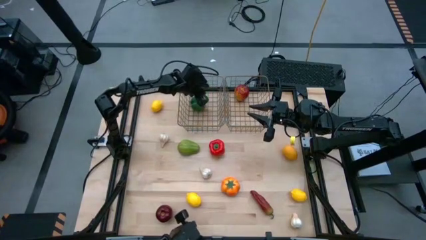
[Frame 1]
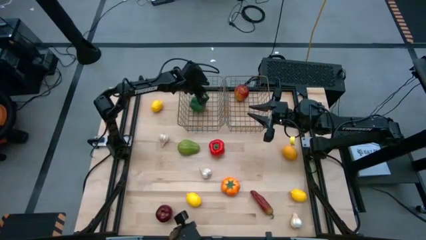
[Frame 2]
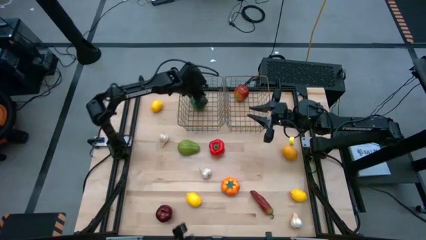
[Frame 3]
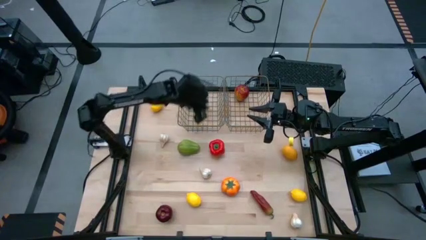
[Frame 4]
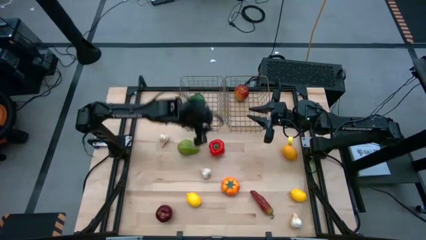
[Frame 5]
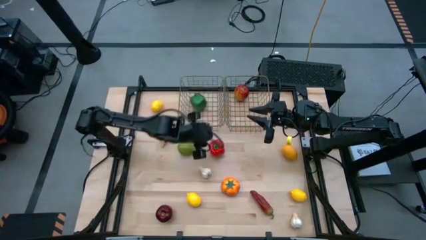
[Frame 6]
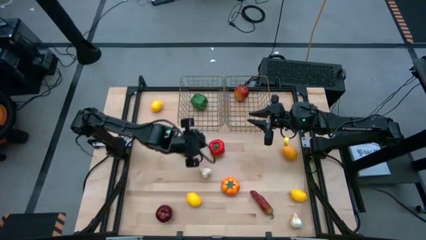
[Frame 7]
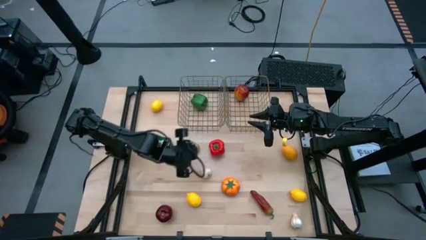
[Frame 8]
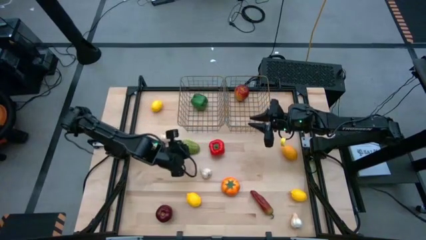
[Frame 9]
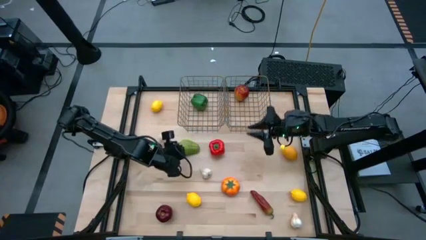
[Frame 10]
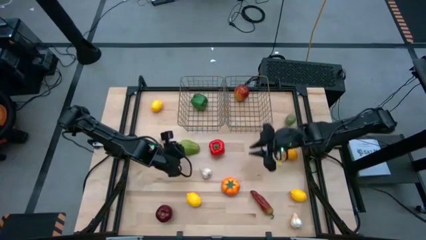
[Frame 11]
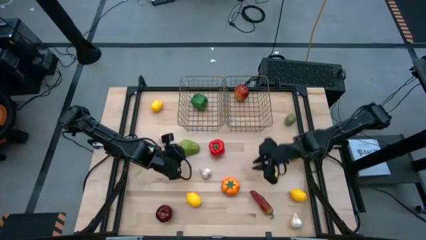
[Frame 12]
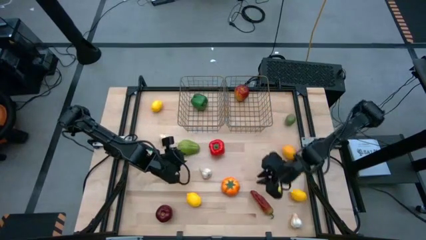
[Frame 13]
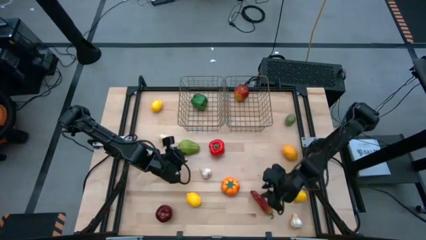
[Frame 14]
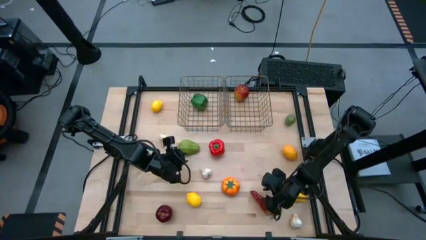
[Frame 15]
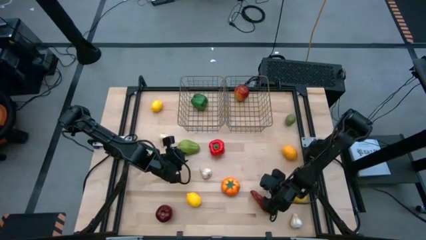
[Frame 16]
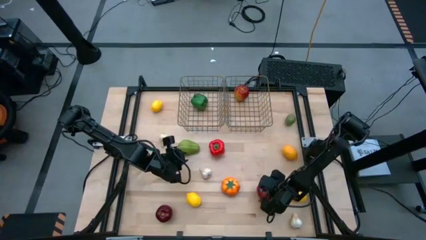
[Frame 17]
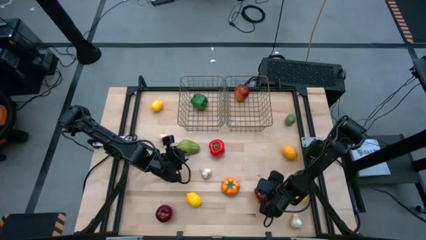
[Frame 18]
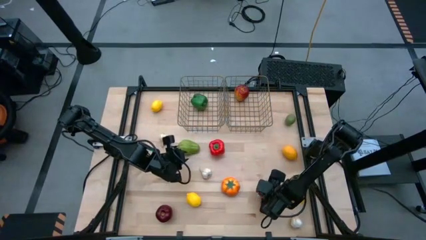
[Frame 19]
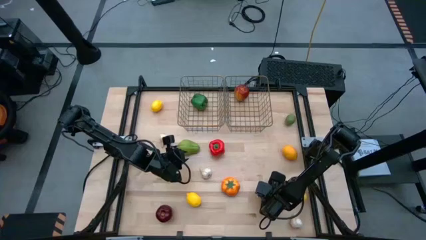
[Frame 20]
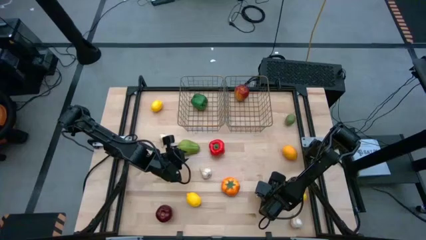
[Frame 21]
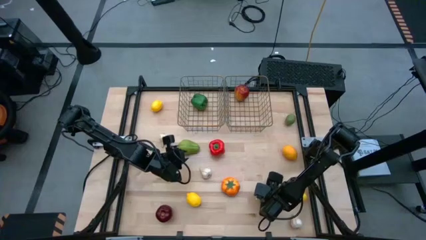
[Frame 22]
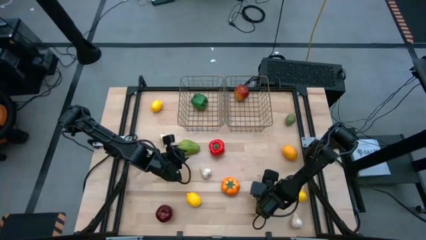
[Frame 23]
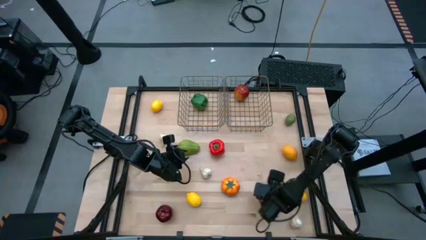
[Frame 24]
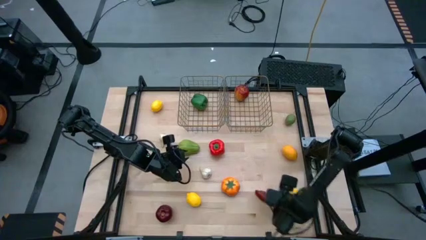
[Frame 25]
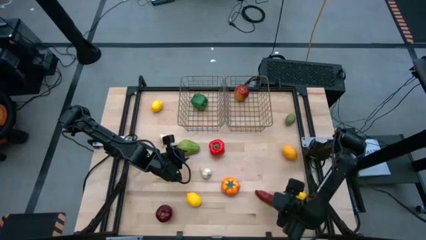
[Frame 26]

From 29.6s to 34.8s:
Task: Sort produce into baskets
Put the chili pepper into the left mesh basket

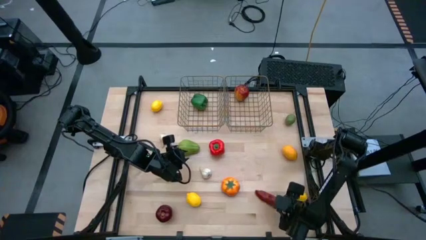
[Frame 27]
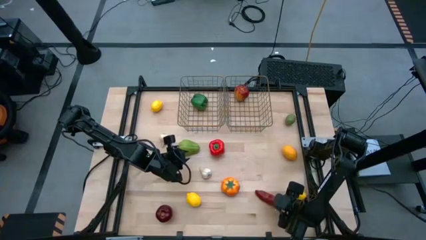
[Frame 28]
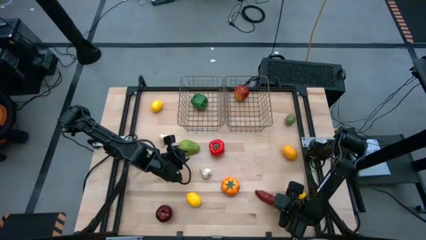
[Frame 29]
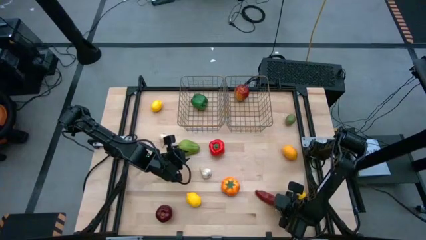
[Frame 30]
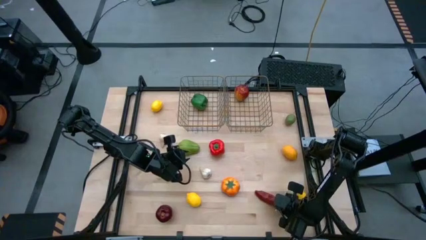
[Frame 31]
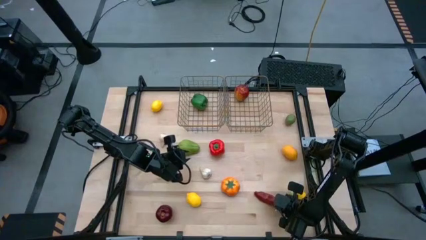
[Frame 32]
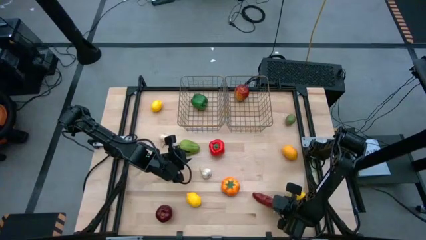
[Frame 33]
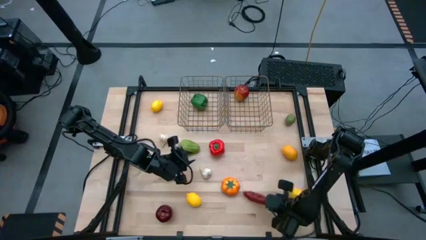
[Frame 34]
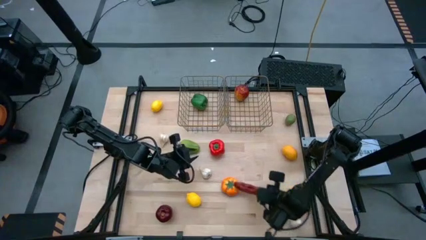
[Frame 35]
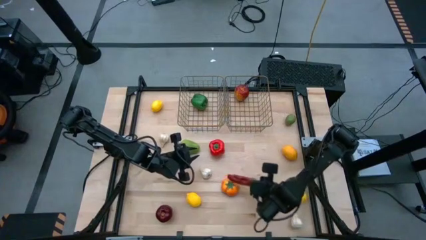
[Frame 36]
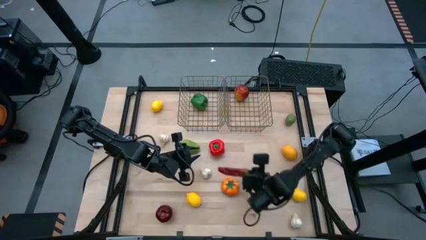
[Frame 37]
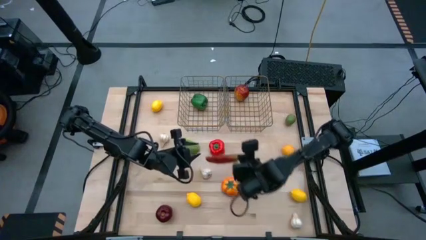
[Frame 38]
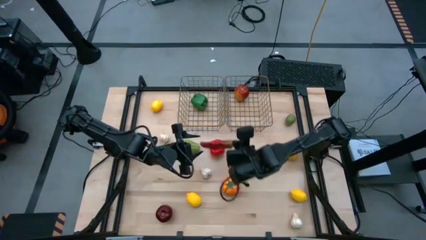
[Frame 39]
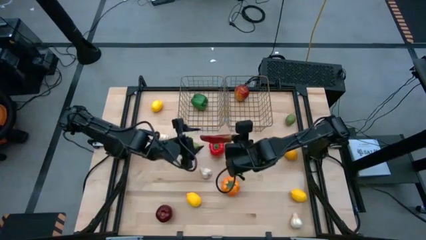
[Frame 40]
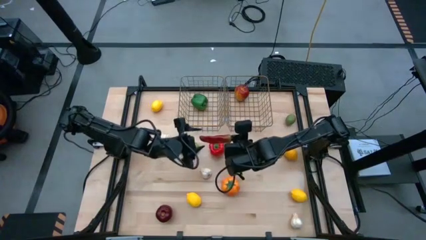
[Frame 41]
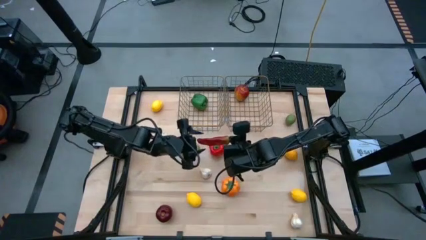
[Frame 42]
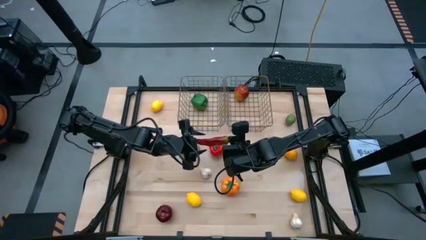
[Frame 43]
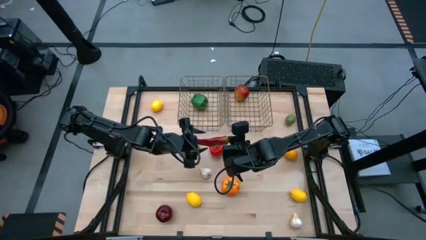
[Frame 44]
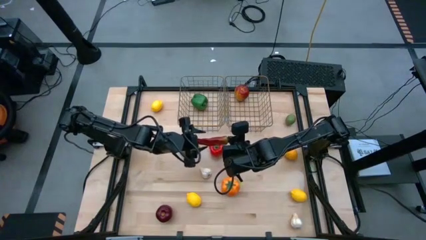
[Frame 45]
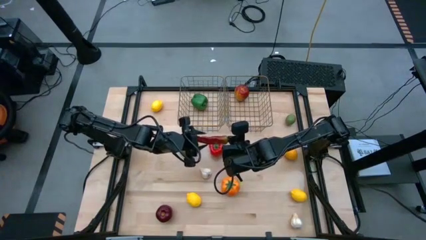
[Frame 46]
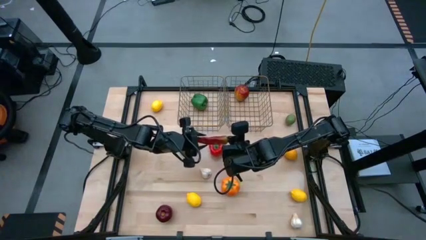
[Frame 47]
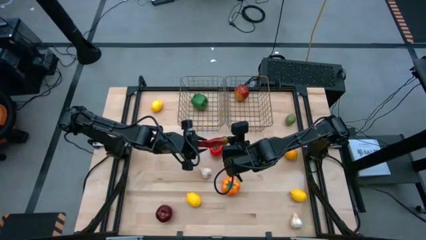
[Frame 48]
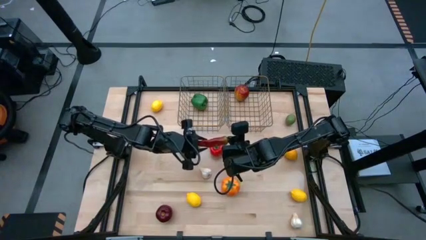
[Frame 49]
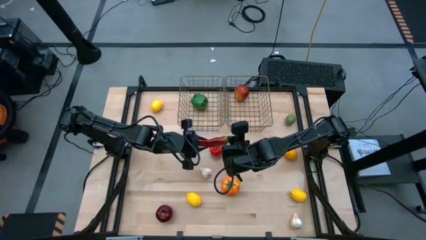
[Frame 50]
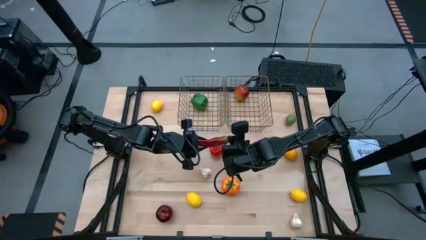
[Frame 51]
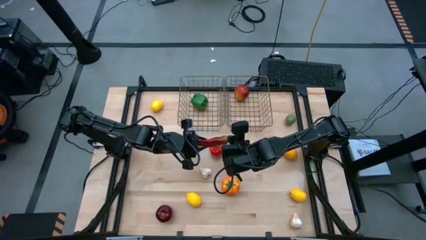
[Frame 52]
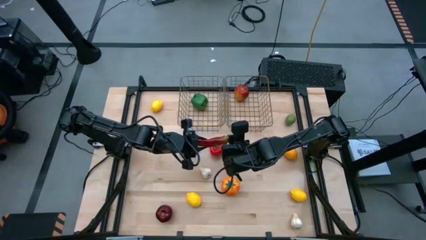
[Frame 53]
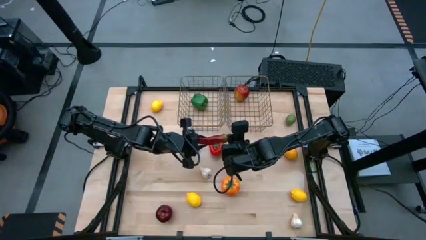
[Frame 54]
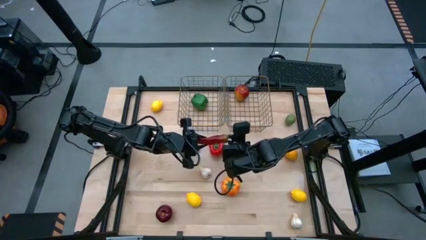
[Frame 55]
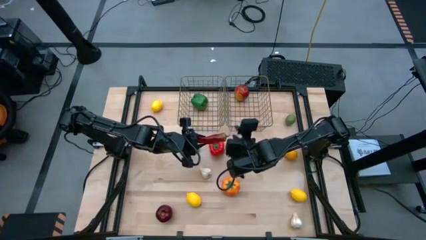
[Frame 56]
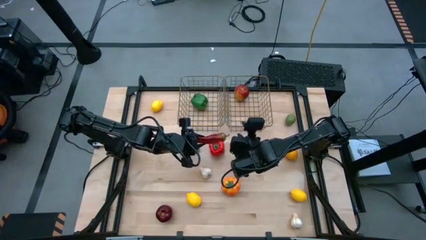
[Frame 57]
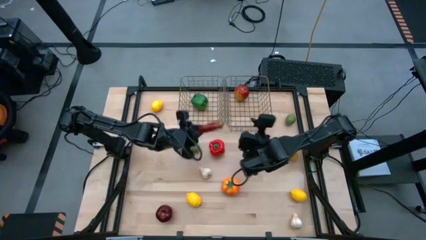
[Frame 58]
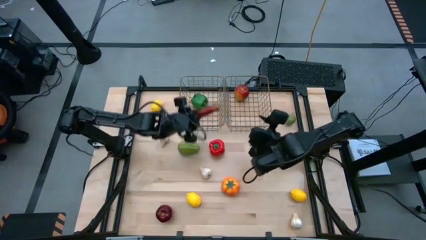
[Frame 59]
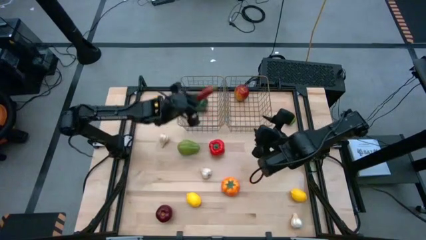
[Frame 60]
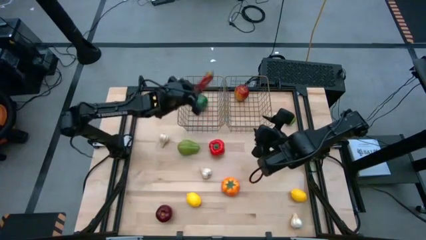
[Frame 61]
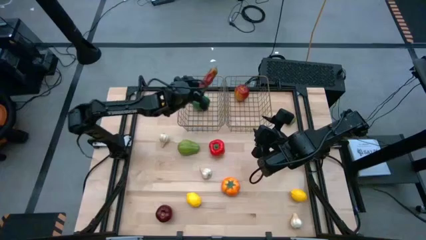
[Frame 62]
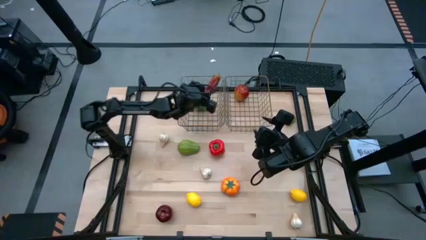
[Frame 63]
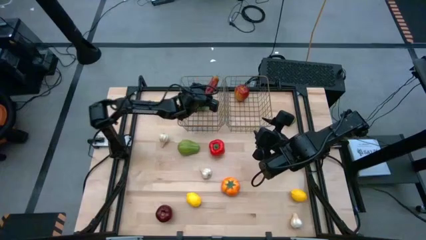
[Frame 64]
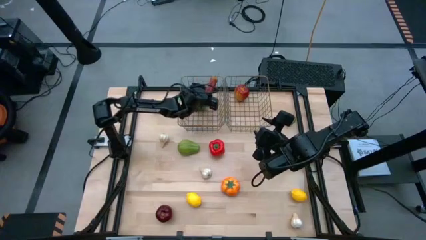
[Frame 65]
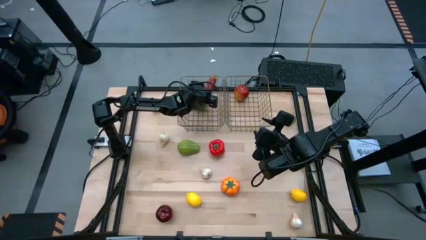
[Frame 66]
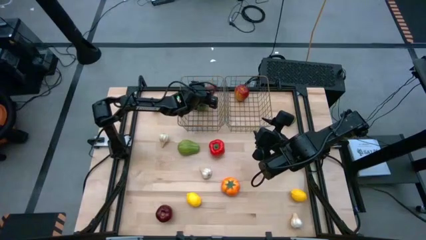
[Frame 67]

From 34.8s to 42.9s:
Put the green bell pepper into the left mesh basket

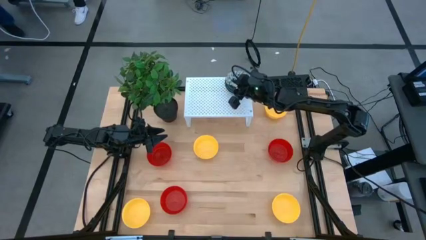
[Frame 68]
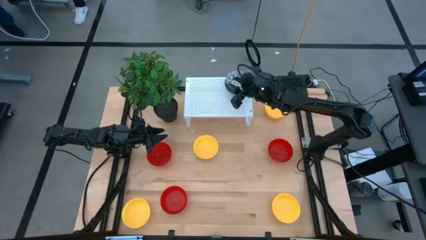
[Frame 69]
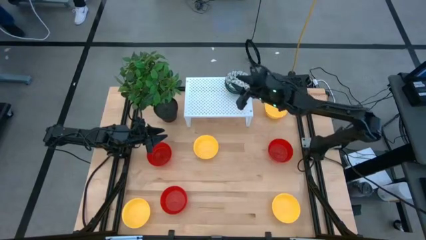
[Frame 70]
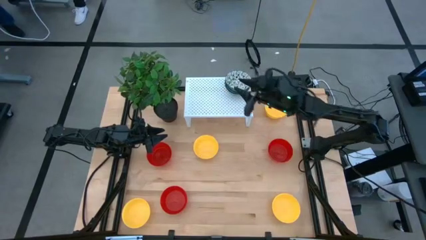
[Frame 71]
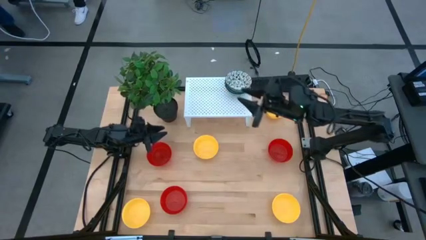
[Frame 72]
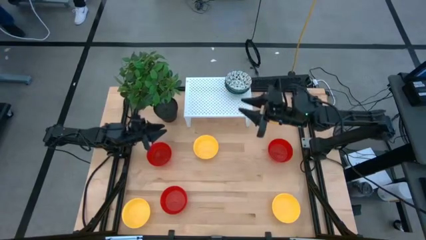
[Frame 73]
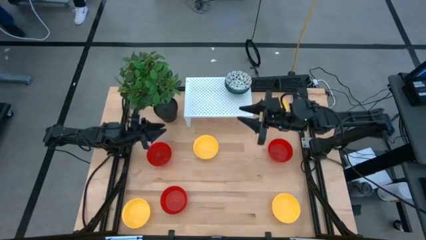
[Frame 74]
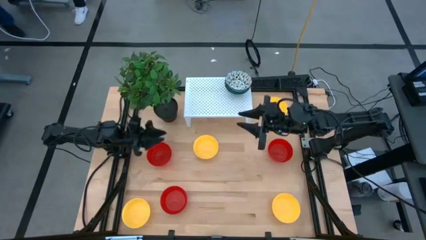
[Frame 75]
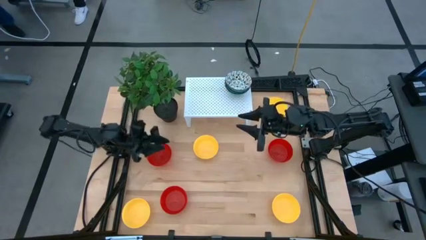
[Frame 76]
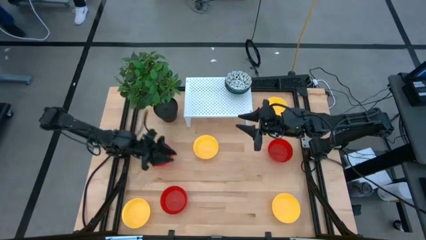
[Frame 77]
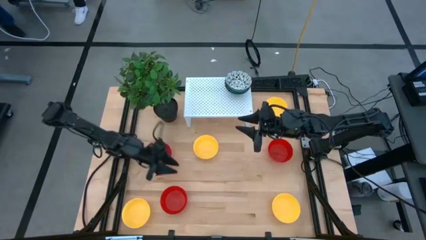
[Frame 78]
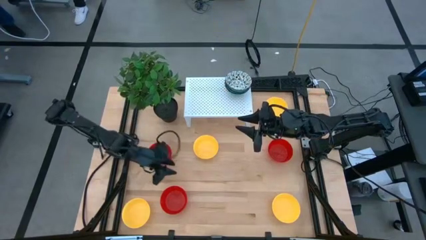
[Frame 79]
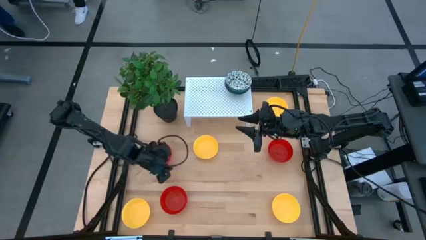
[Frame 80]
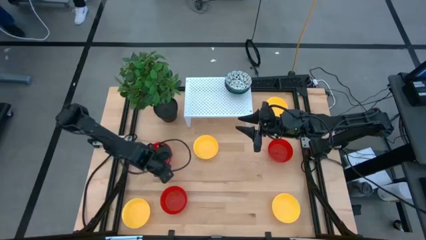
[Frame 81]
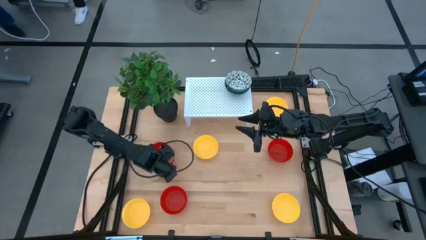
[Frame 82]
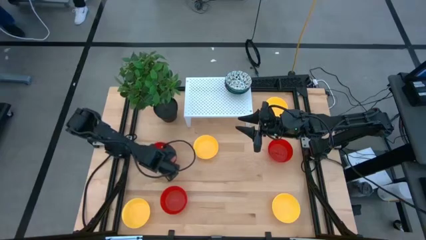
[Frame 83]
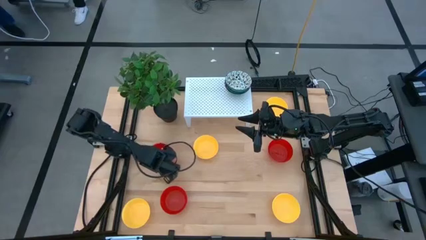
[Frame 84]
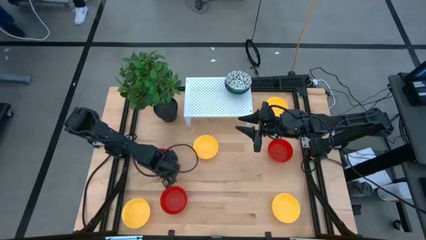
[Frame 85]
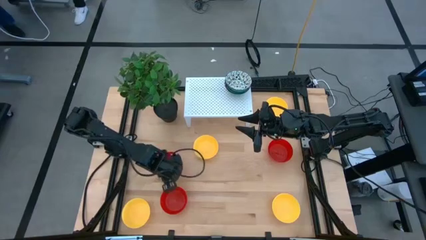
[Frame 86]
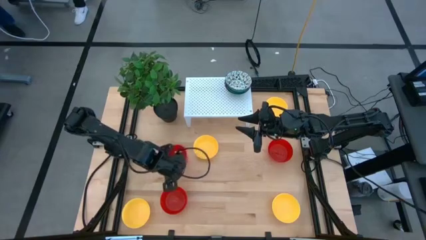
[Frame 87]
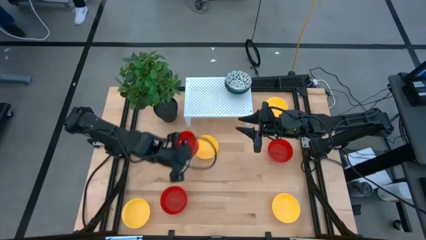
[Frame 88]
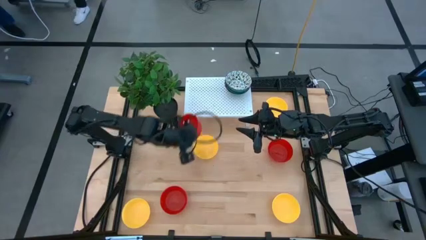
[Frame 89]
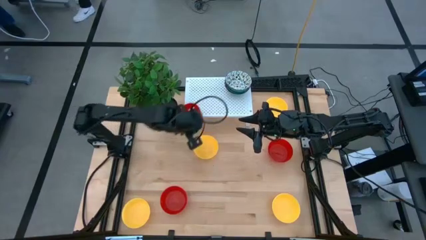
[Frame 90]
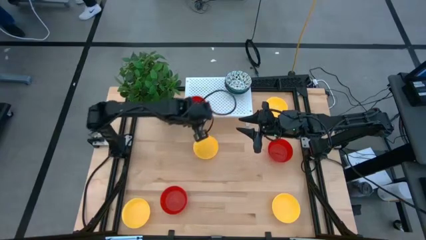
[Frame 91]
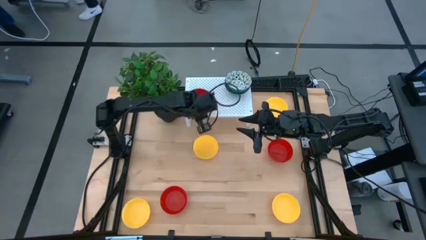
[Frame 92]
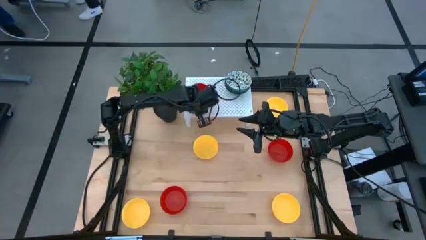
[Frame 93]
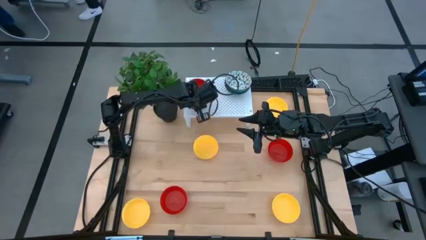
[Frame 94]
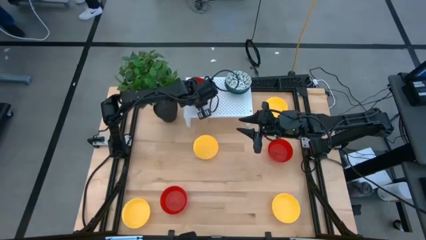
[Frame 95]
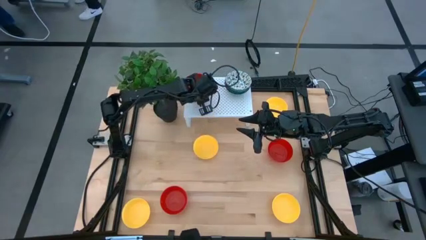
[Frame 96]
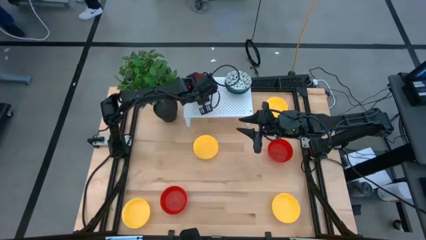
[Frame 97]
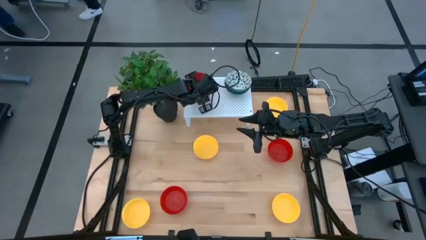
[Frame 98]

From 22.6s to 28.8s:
Task: Pick & Place Mini bowls
Put the red bowl on the shelf
